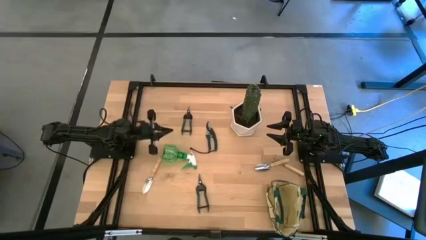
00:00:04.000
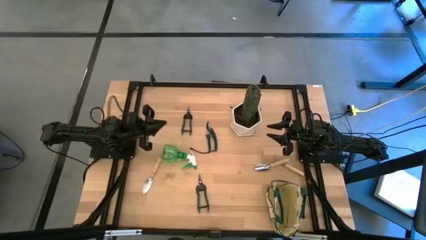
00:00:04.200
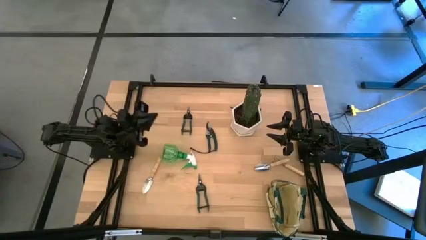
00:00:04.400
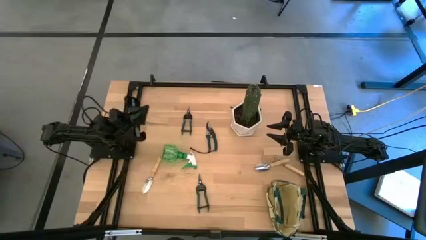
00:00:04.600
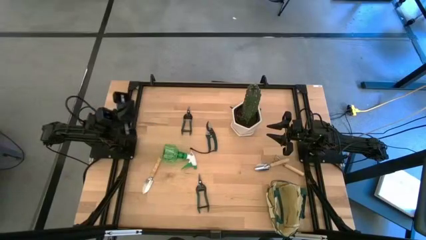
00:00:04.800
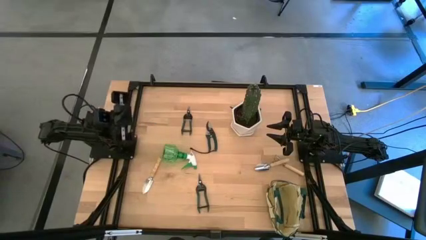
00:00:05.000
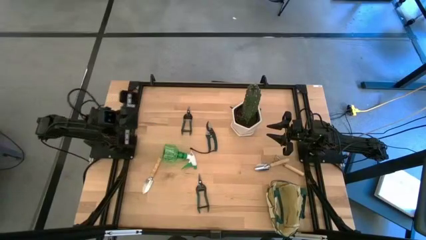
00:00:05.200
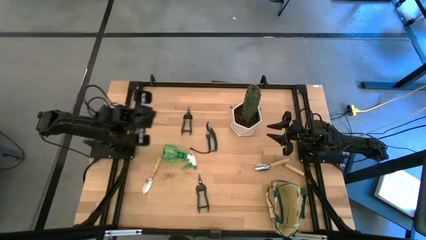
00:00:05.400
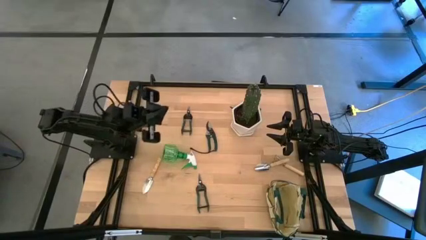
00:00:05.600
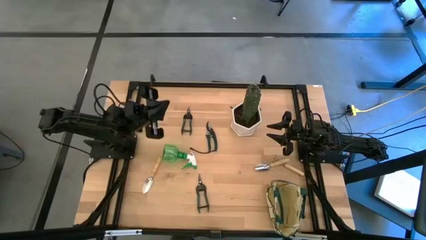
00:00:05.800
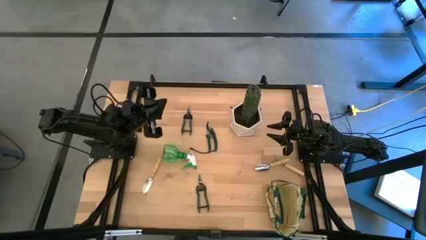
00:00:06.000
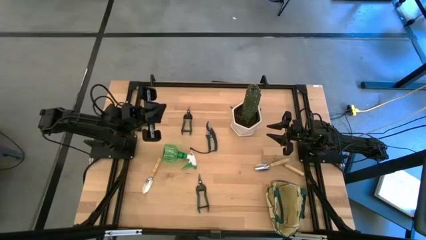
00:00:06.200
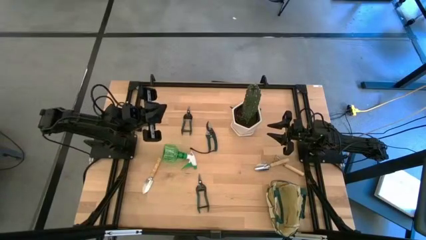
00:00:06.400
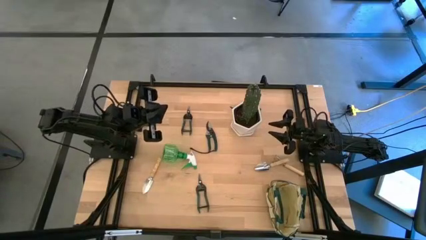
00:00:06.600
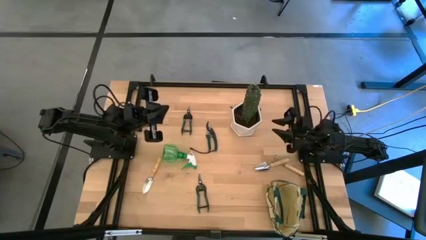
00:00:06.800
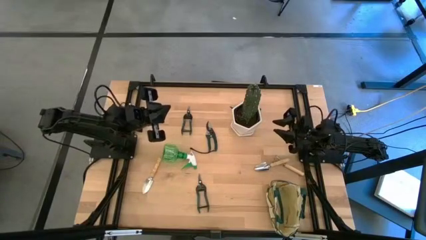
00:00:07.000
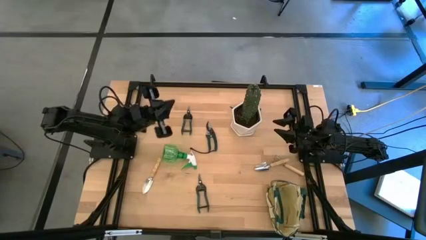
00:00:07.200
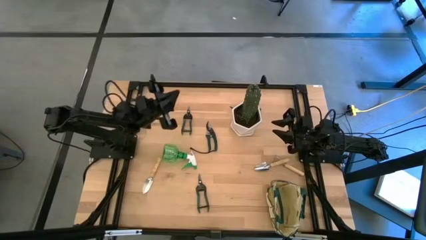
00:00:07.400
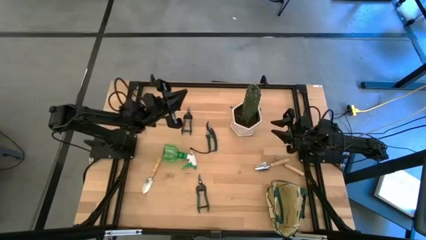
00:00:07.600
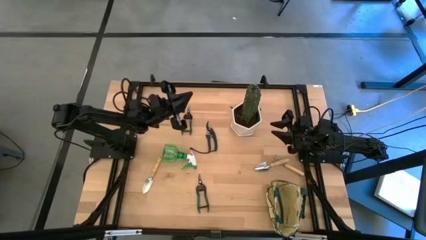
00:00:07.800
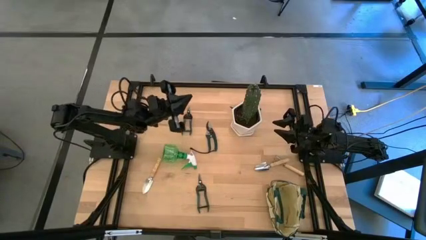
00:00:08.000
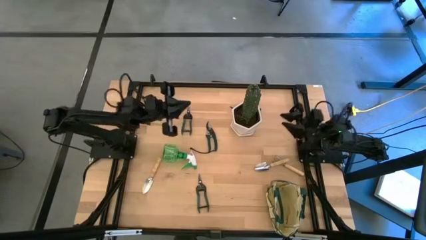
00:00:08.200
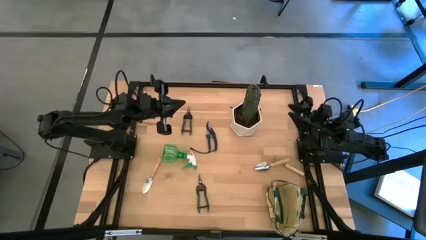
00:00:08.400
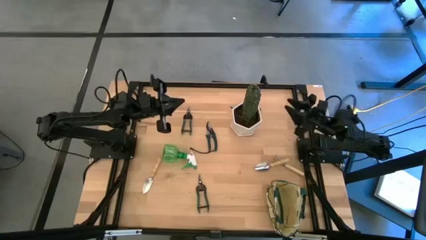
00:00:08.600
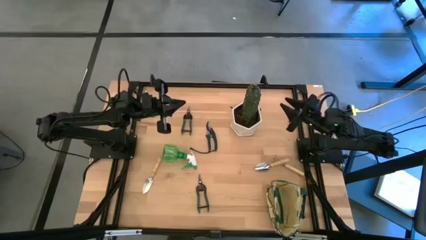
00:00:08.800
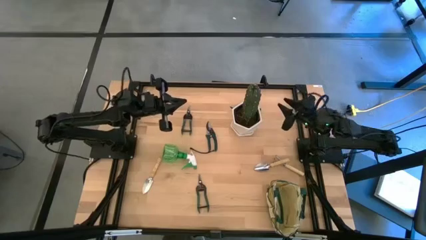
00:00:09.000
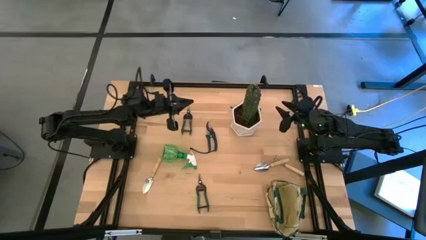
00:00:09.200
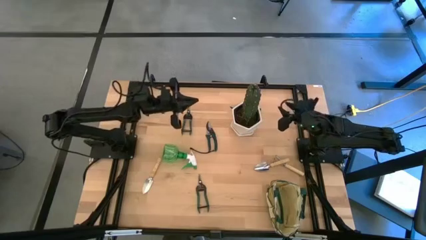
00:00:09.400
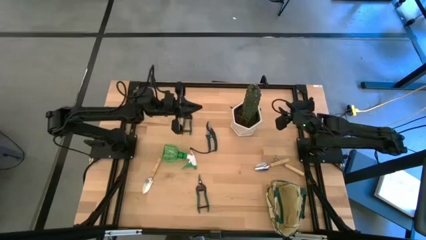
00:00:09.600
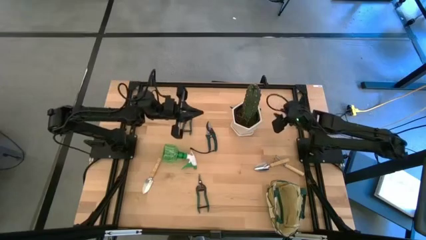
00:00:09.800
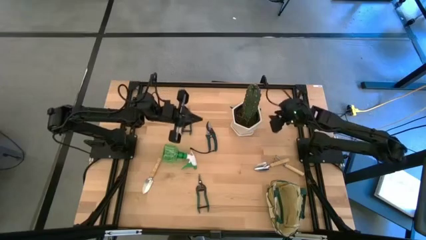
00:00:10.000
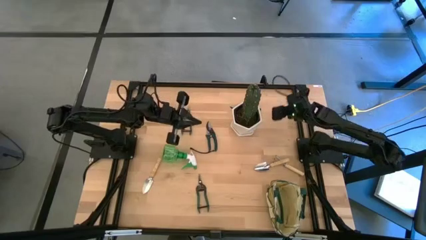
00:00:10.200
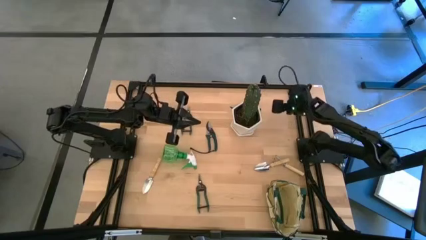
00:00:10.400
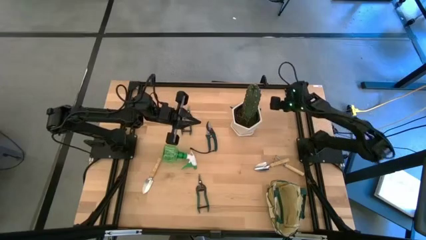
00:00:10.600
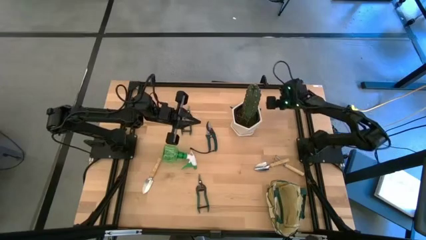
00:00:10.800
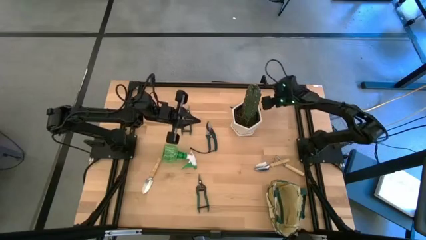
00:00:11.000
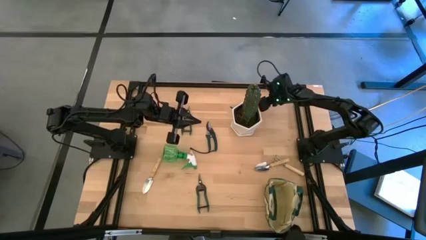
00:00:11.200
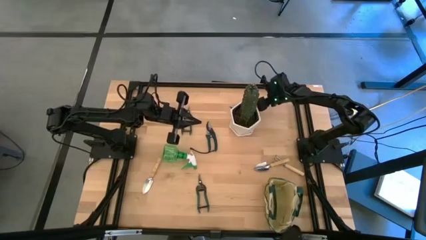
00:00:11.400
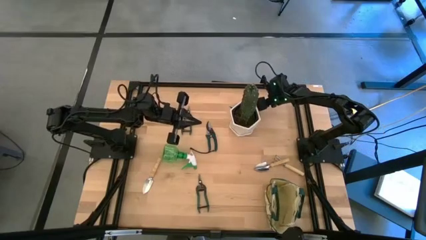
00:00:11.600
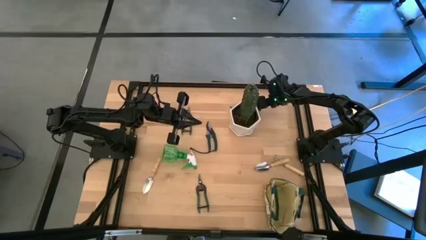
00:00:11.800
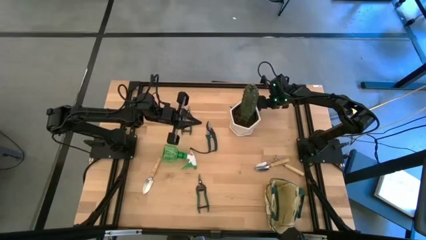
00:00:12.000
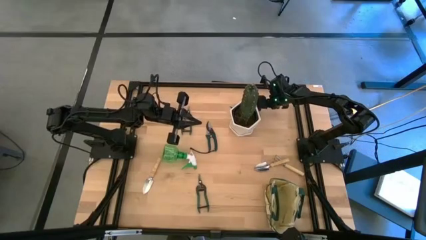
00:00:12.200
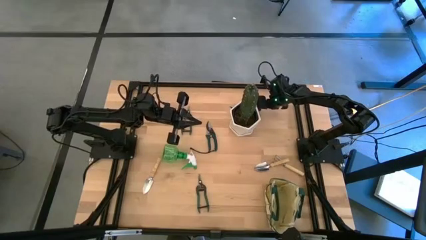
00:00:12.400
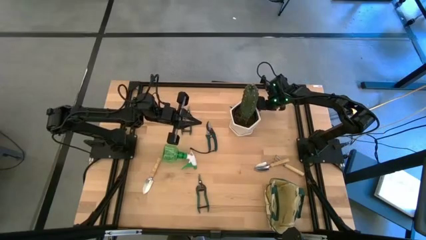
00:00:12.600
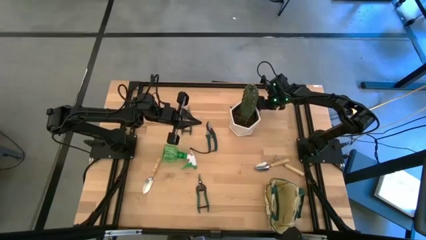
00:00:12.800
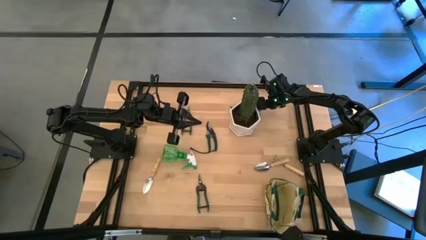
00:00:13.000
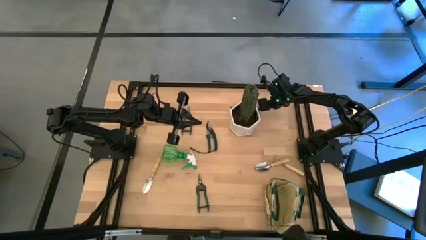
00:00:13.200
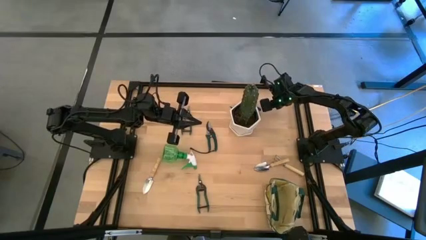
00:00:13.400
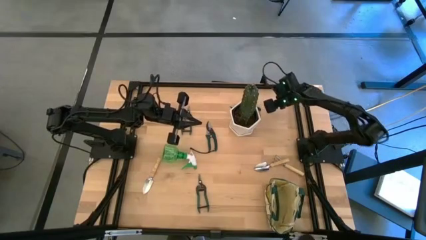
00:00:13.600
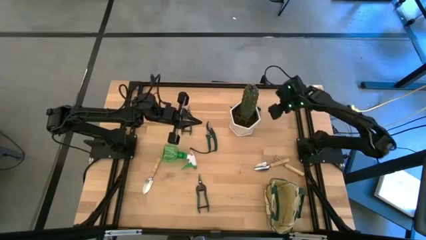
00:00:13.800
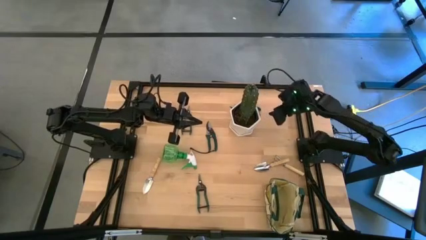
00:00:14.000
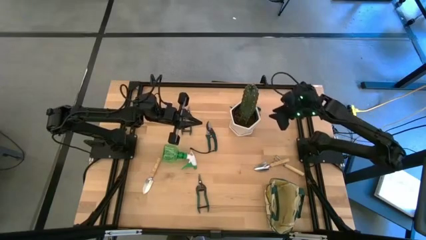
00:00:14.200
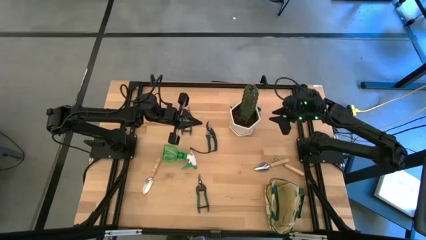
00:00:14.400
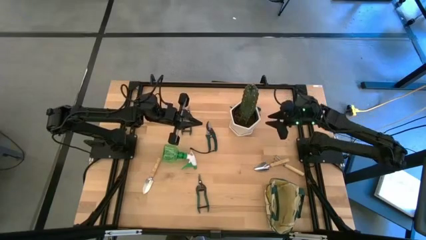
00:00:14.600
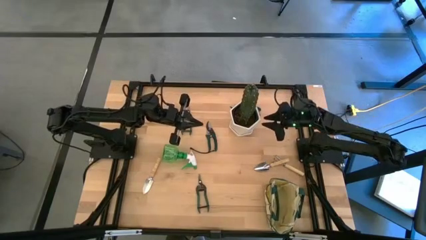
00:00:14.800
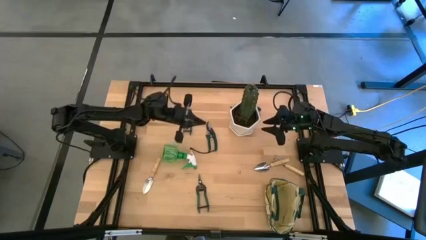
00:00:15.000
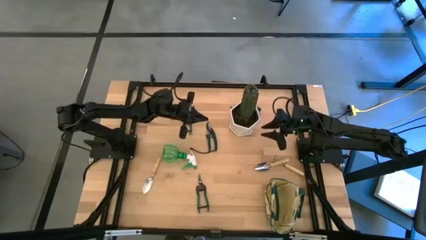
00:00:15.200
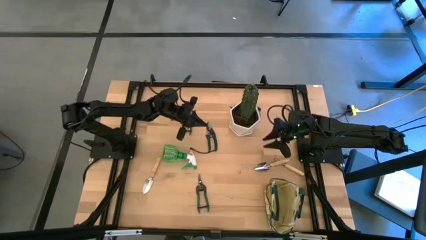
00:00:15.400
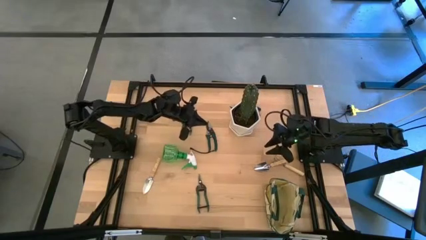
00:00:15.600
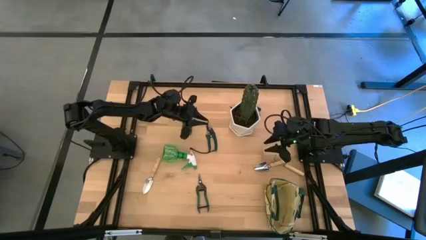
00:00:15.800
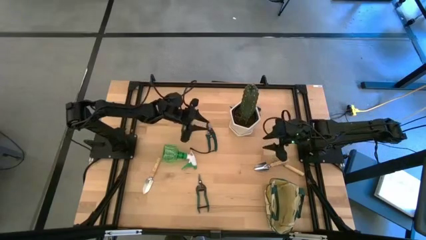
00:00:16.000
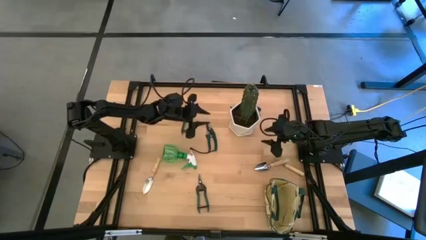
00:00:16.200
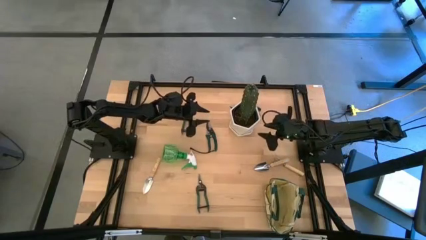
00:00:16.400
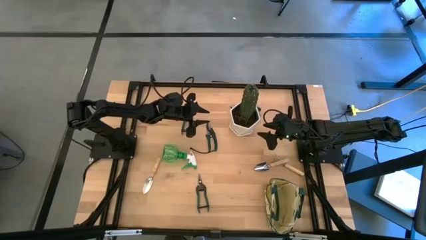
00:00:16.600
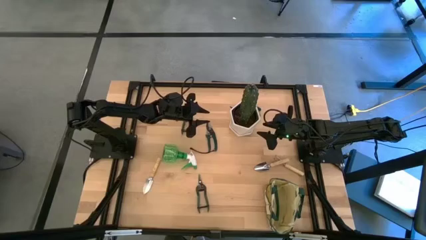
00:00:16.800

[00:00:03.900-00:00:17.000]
Task: Pick & Place Garden tools in Gardening bag
Move the white vase to the right side of the table
